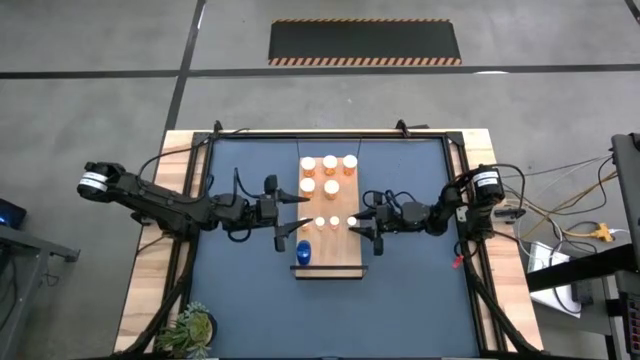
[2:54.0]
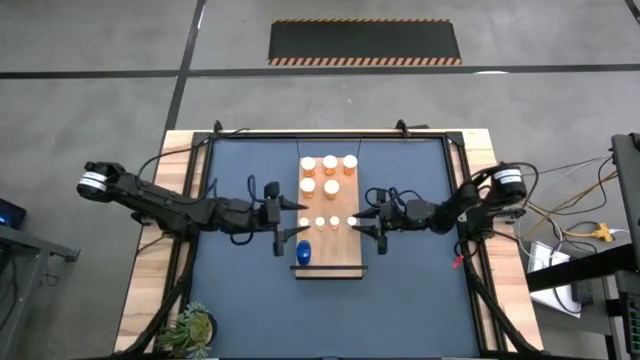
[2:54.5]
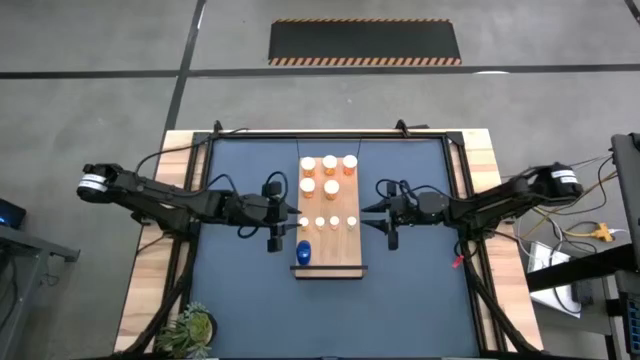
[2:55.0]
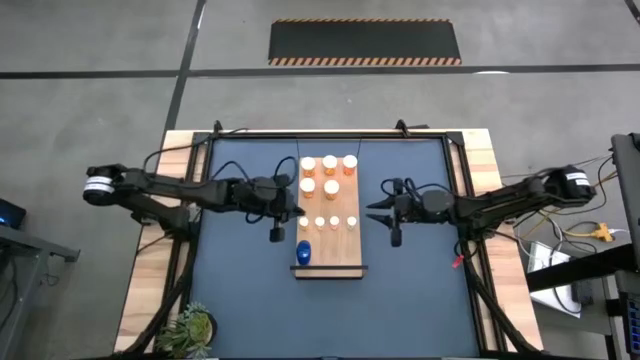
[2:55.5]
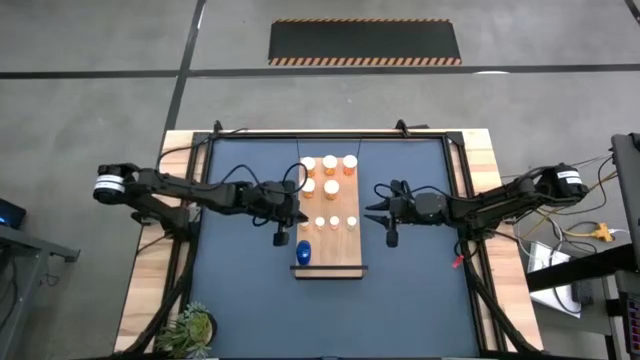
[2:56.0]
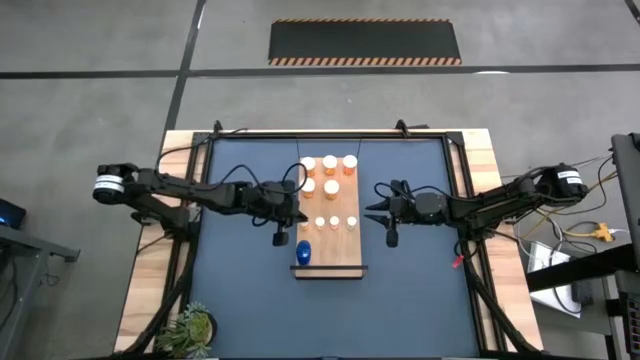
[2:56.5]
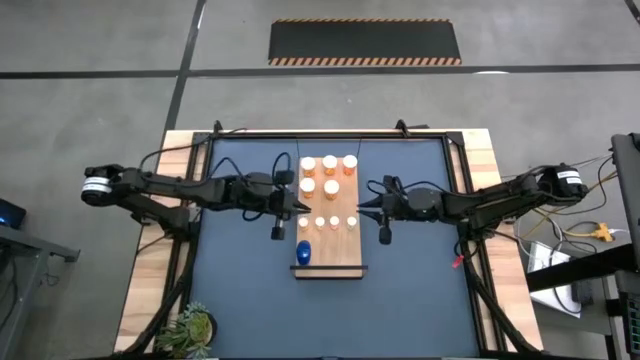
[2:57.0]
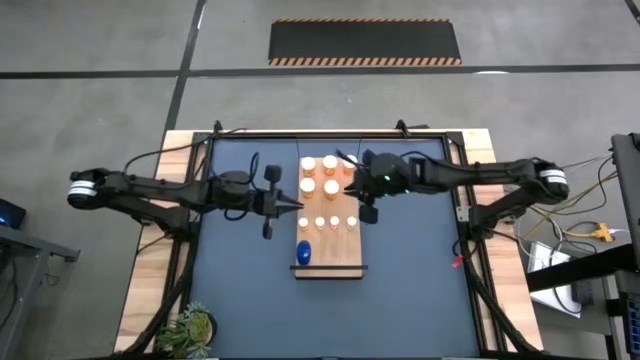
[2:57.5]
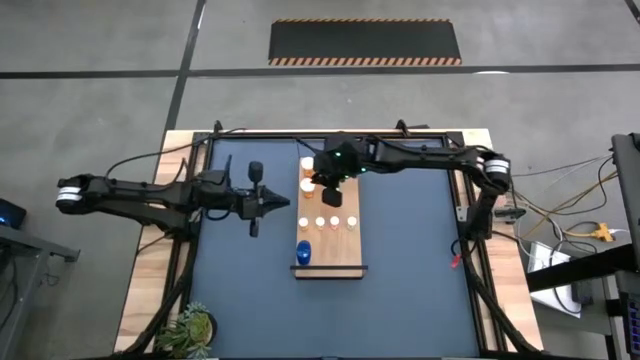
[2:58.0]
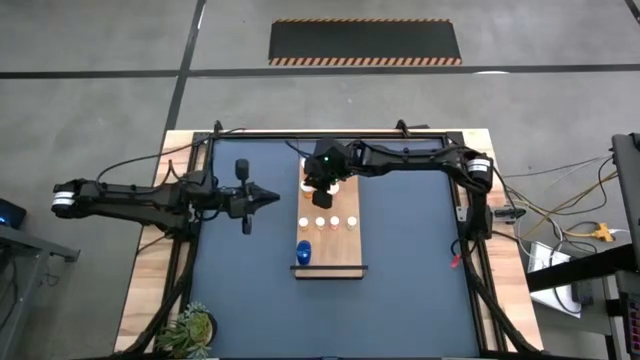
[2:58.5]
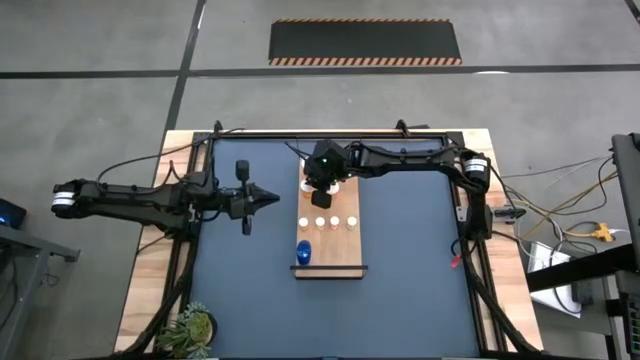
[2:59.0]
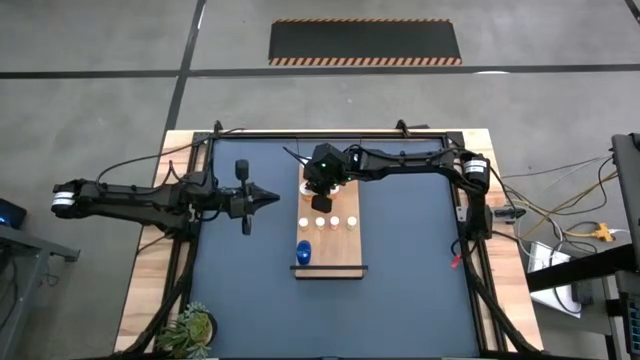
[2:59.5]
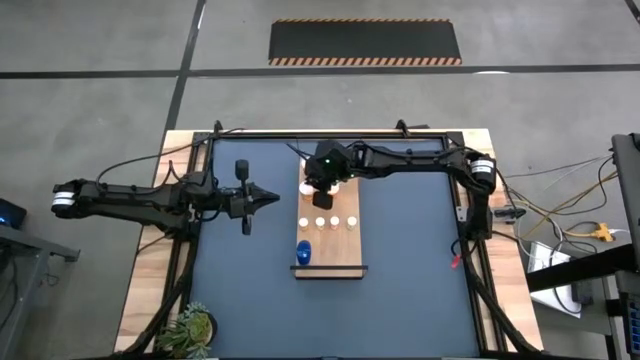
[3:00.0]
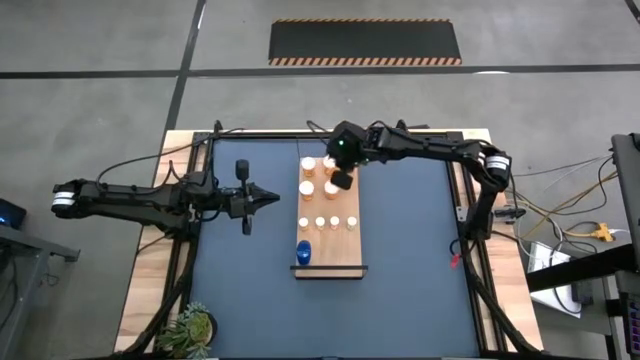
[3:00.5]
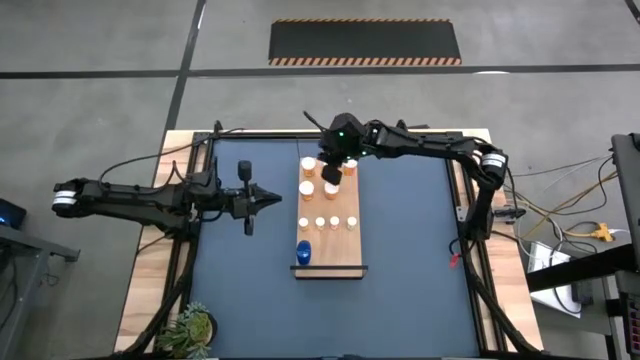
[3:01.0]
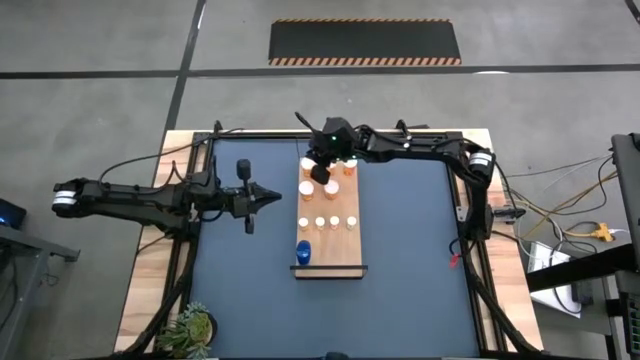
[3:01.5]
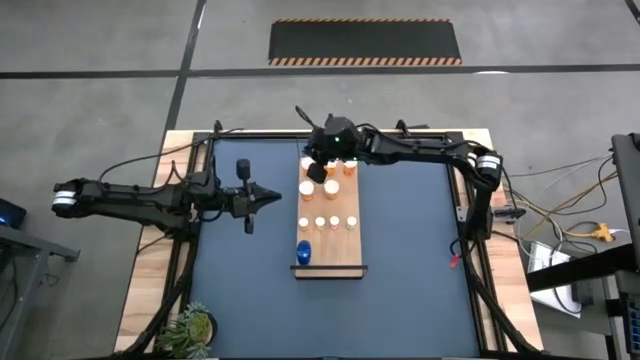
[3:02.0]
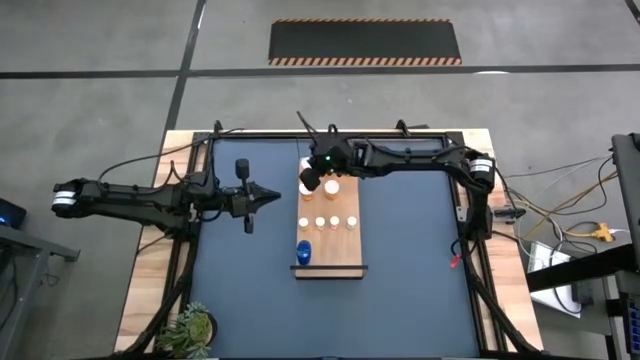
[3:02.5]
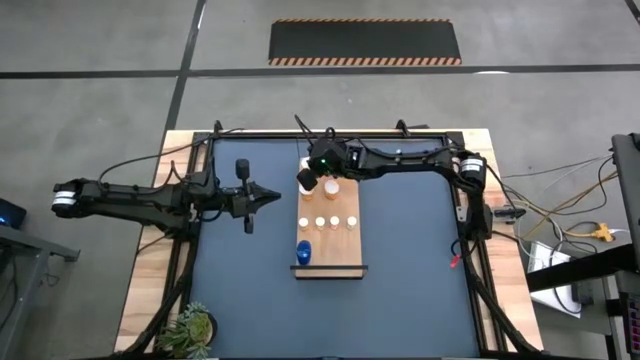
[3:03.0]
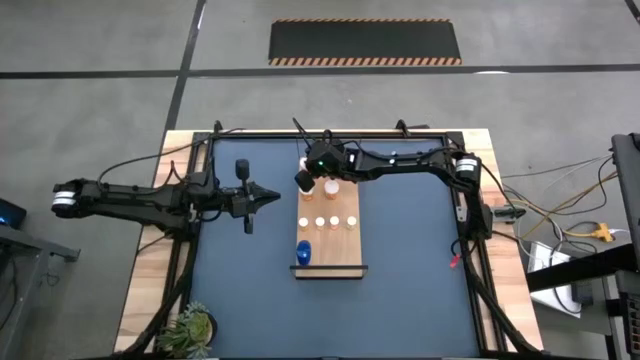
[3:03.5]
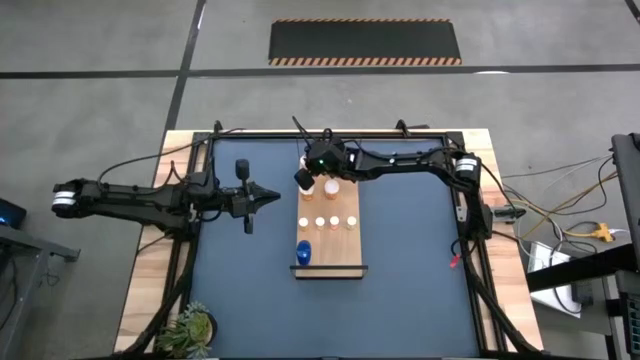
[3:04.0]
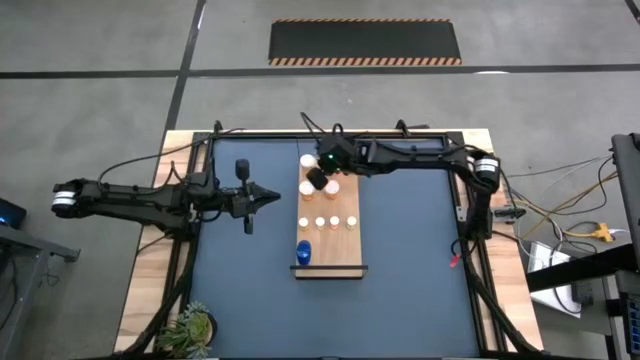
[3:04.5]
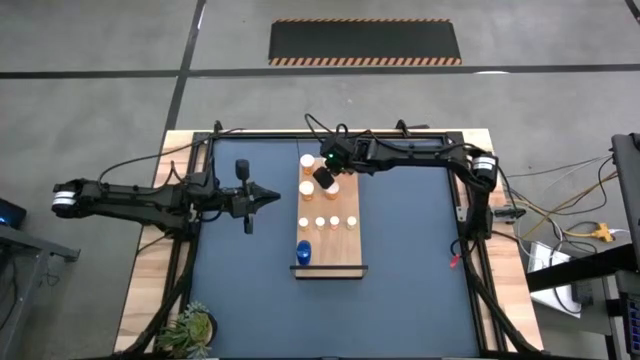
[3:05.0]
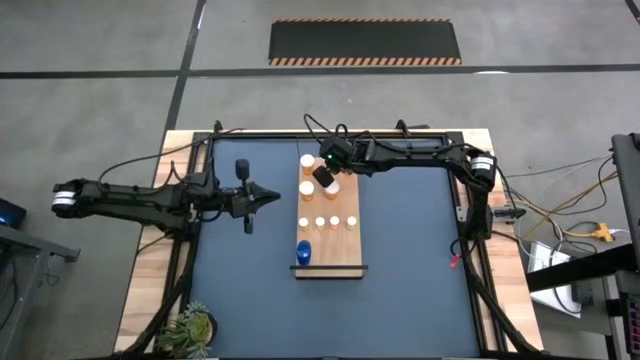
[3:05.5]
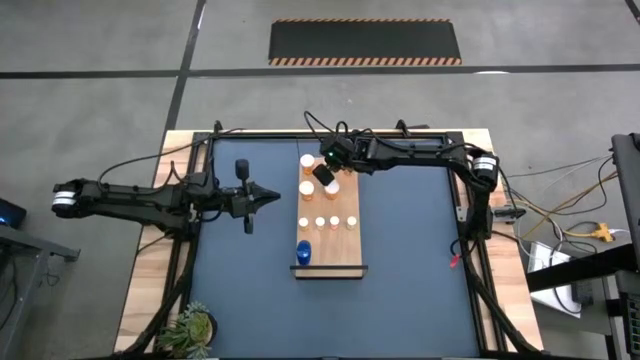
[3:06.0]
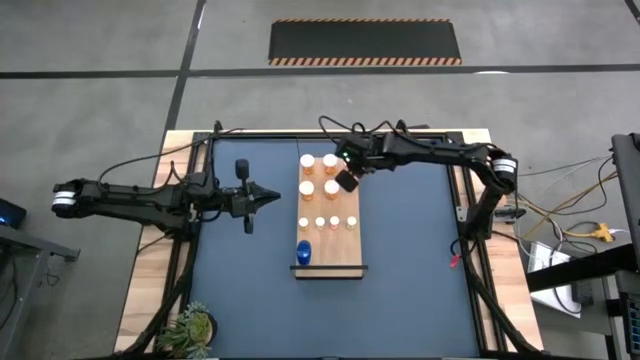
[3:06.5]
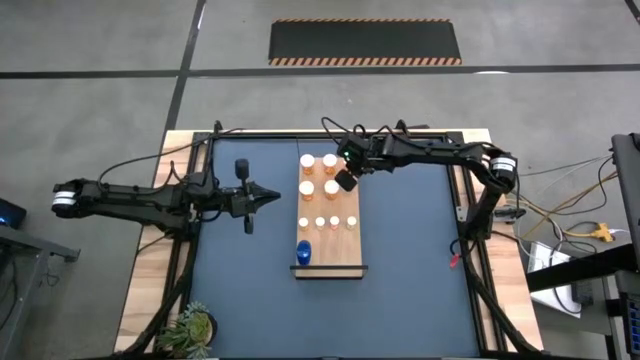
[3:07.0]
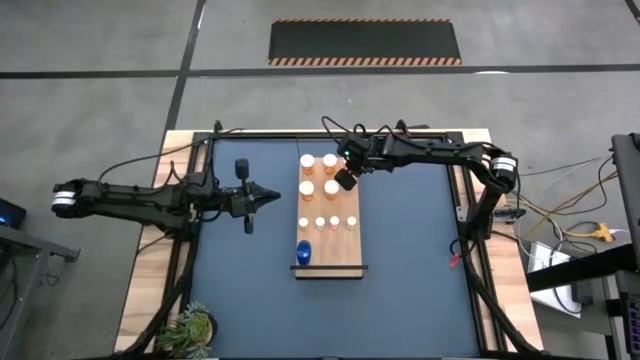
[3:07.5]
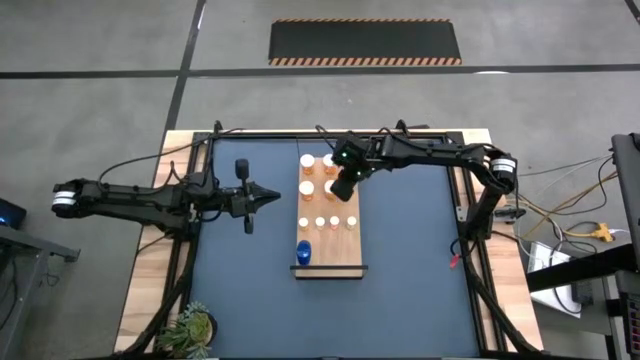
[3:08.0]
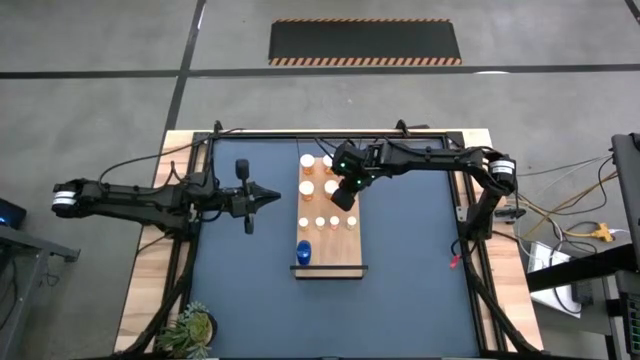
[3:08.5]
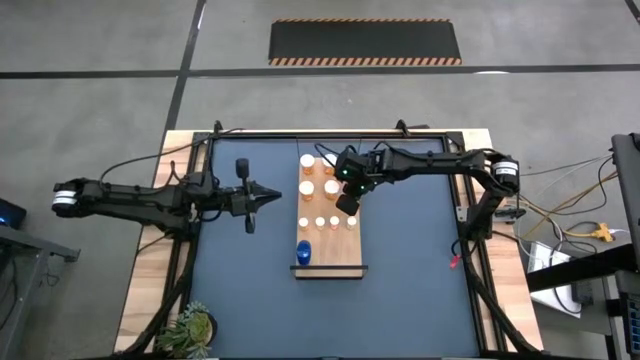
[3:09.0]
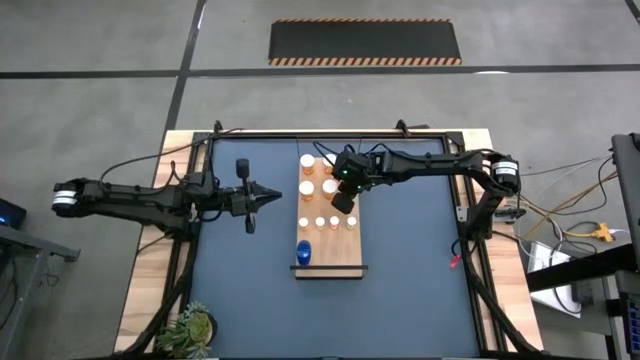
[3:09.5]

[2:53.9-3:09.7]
Task: Pick and place medicine bottles onto shelf by color
Adjust the pill bottles on the shelf

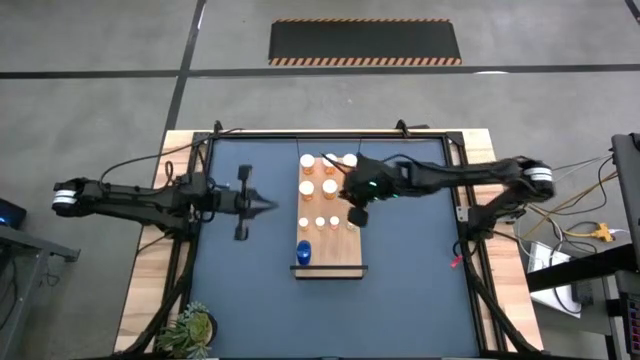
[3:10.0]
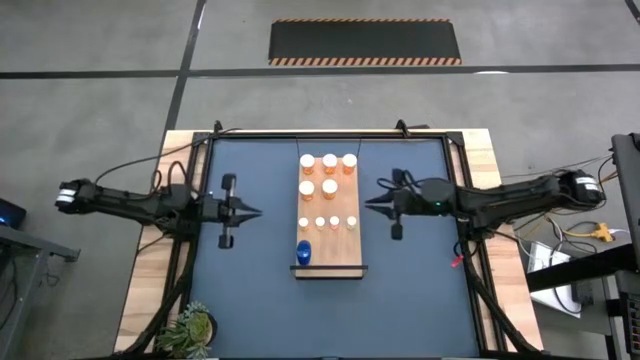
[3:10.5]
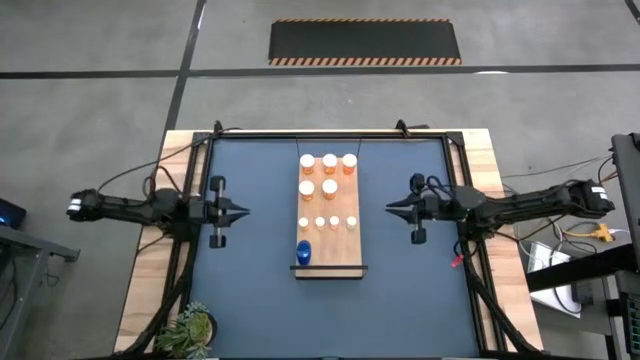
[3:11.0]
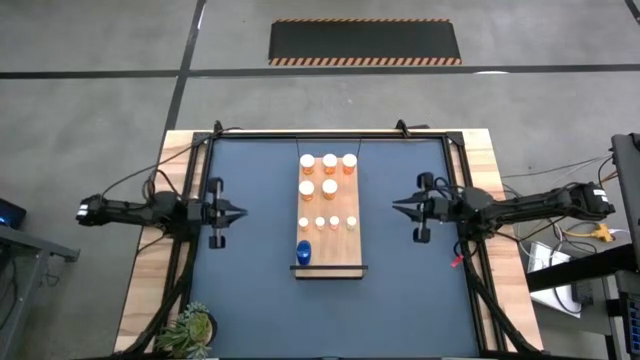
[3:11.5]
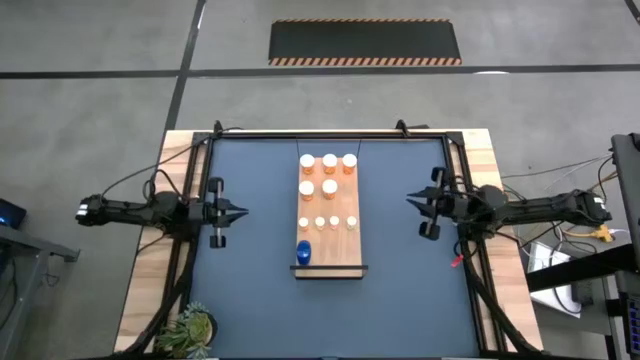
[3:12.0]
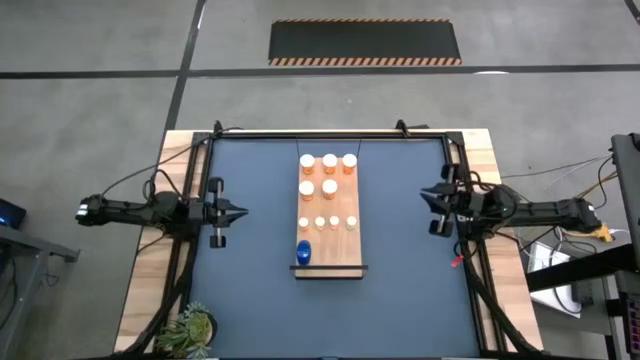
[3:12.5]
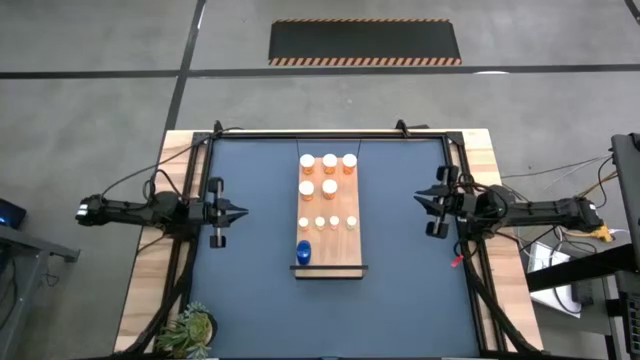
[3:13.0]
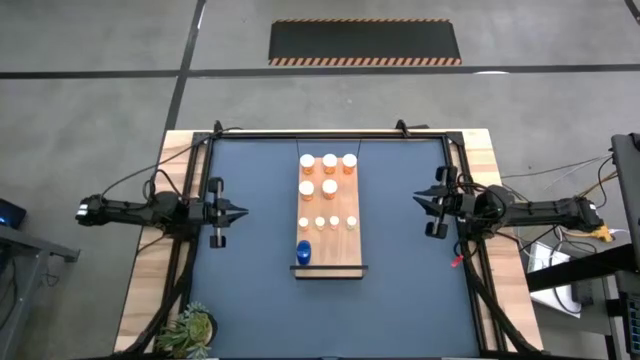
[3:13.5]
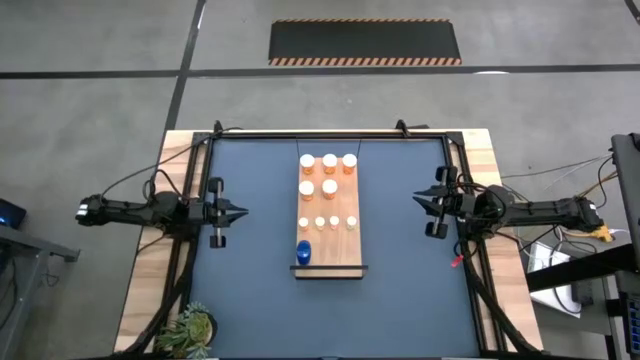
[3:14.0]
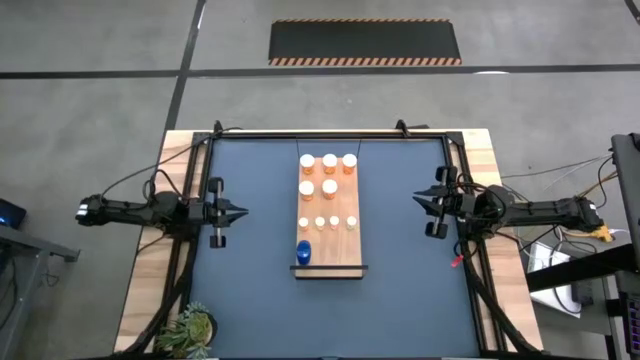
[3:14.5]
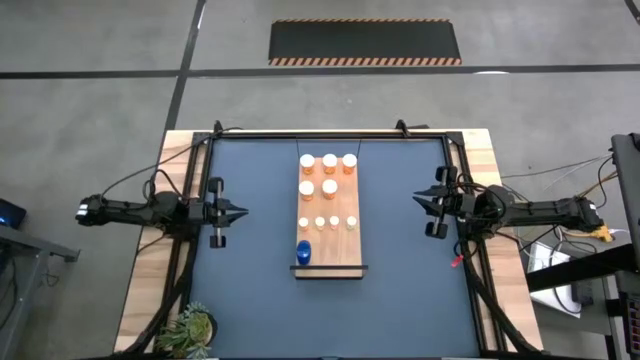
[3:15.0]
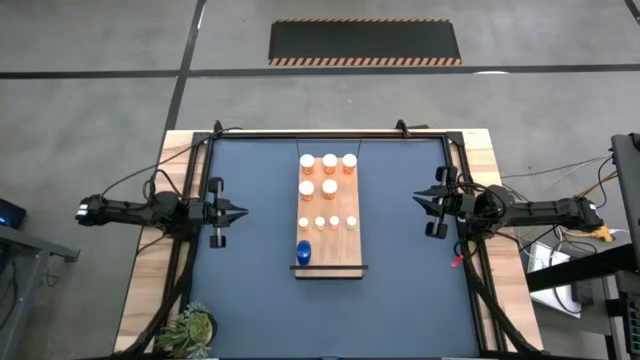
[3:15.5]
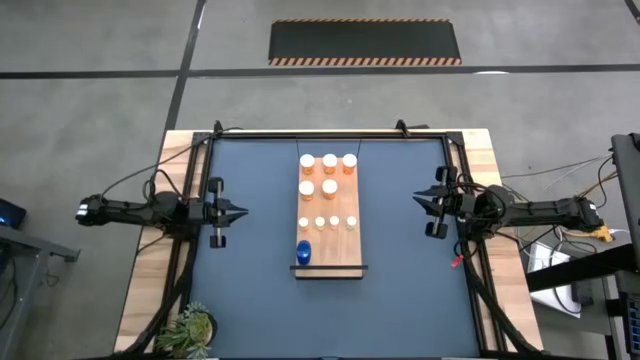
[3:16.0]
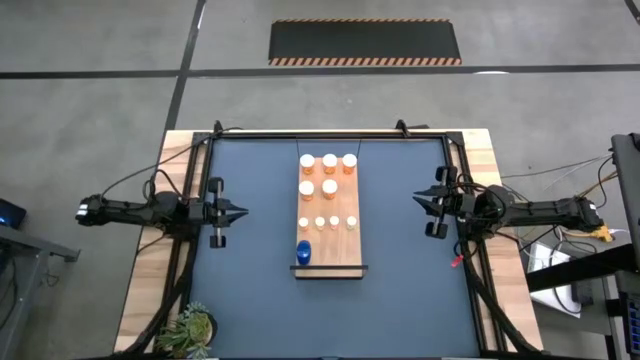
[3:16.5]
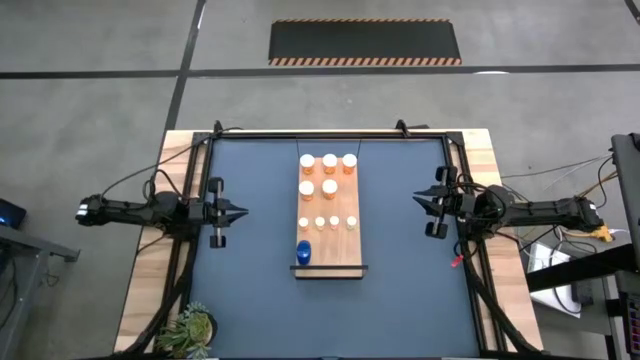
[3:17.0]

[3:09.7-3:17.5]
Return to Home Position
